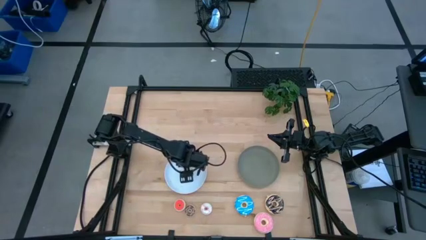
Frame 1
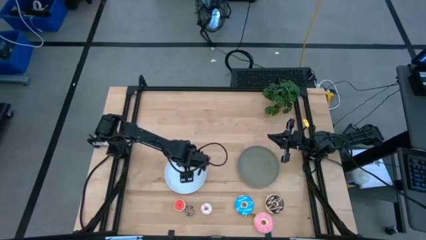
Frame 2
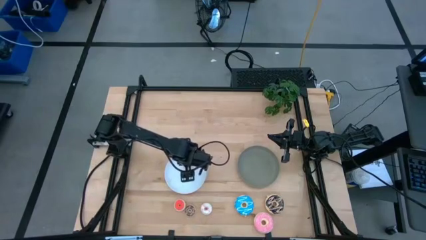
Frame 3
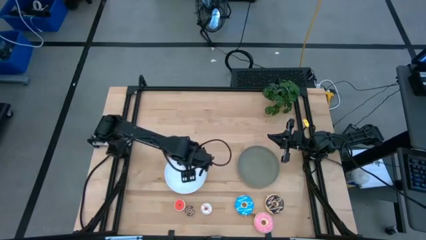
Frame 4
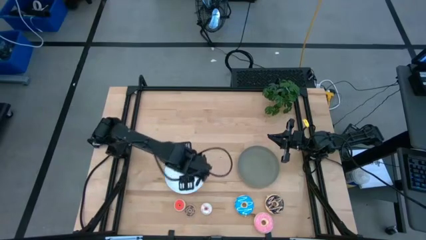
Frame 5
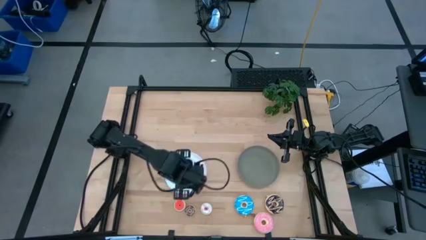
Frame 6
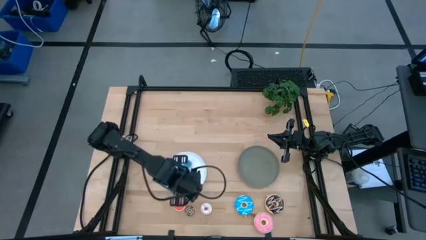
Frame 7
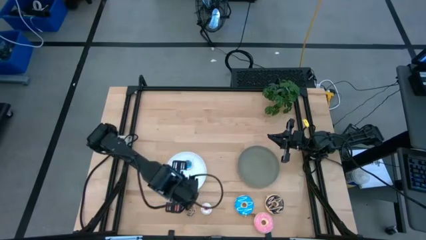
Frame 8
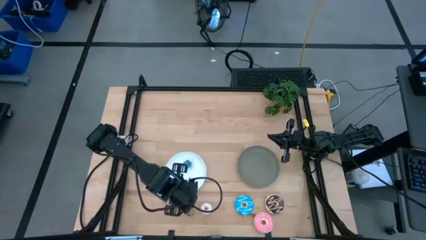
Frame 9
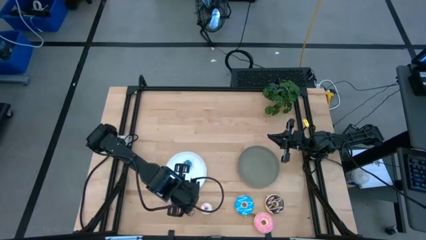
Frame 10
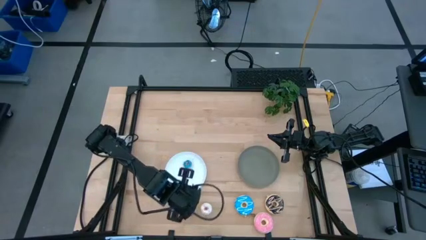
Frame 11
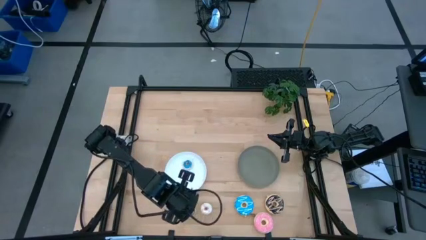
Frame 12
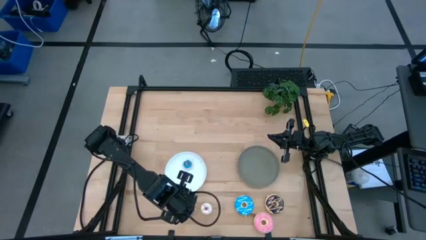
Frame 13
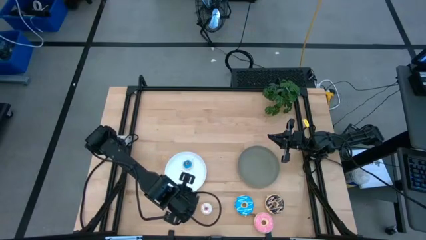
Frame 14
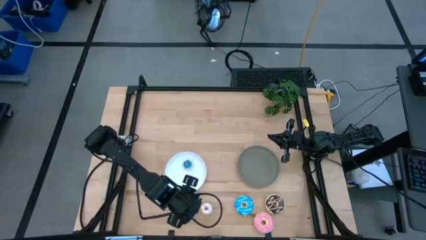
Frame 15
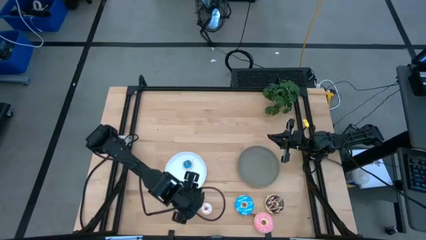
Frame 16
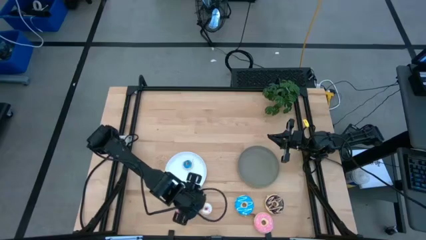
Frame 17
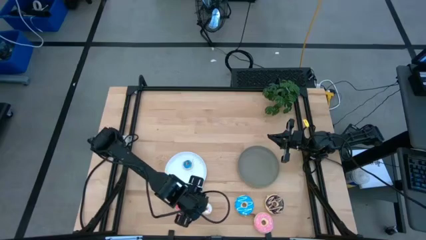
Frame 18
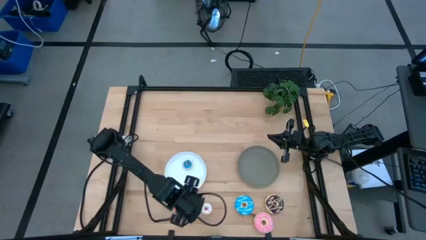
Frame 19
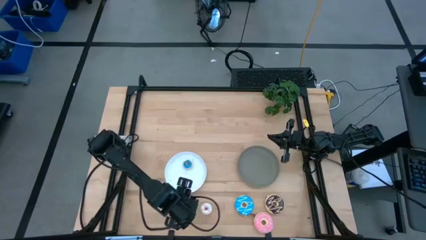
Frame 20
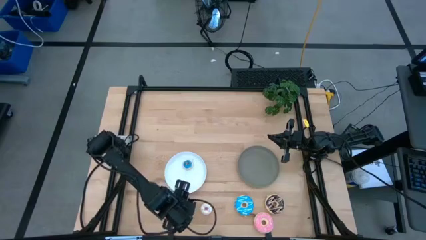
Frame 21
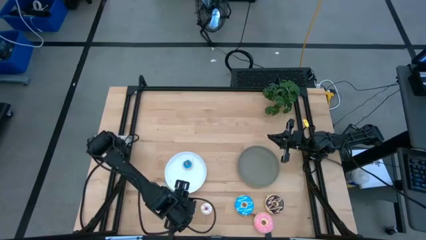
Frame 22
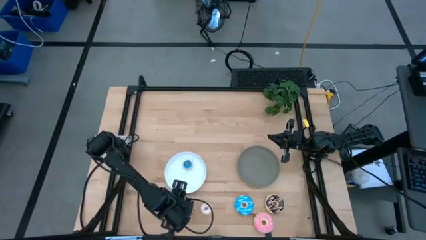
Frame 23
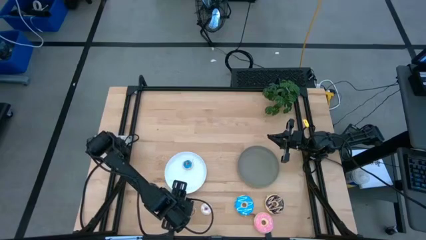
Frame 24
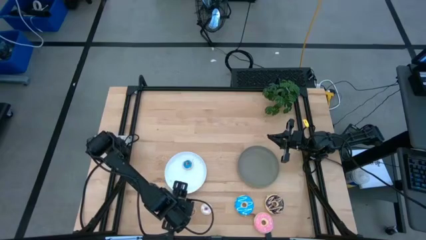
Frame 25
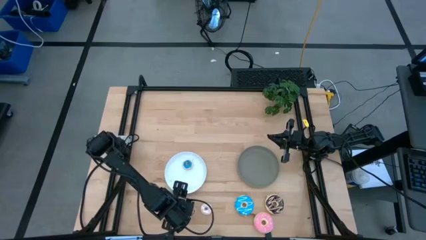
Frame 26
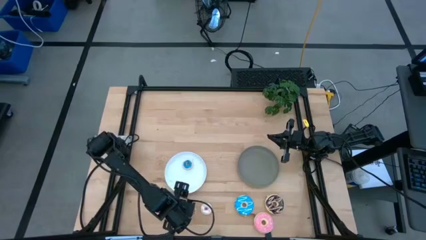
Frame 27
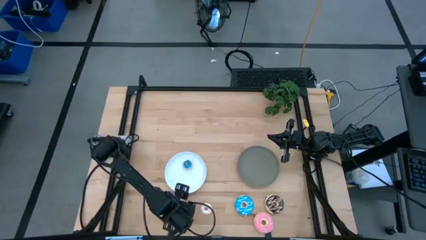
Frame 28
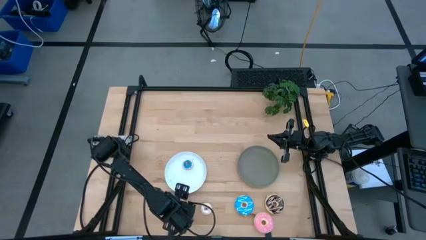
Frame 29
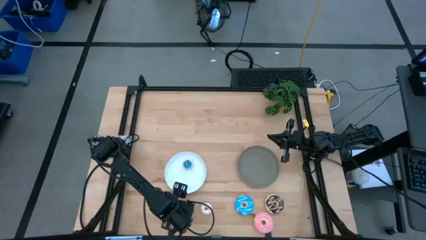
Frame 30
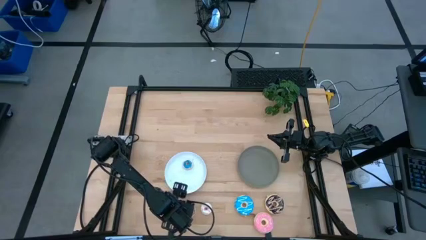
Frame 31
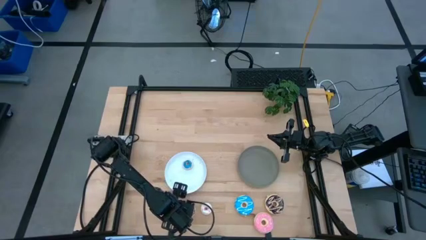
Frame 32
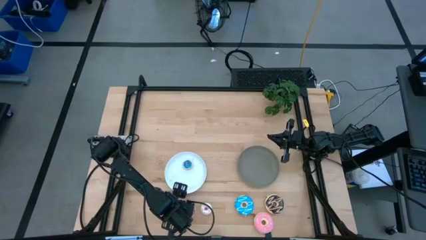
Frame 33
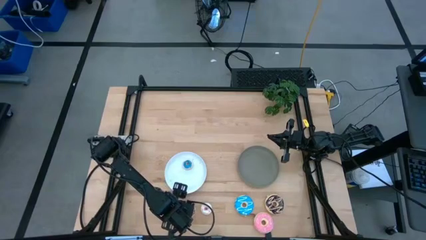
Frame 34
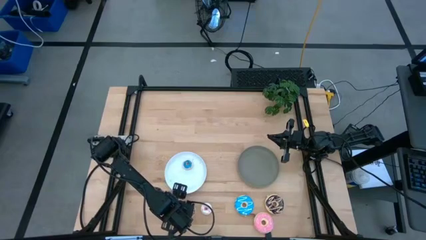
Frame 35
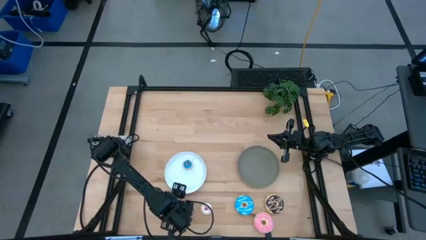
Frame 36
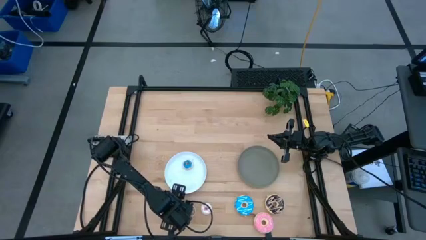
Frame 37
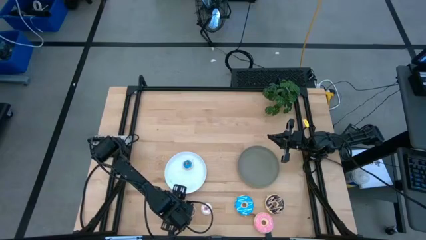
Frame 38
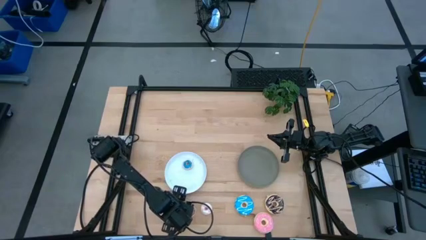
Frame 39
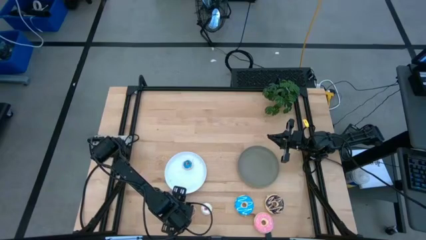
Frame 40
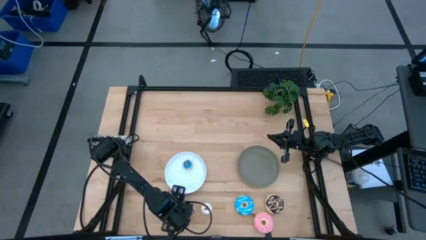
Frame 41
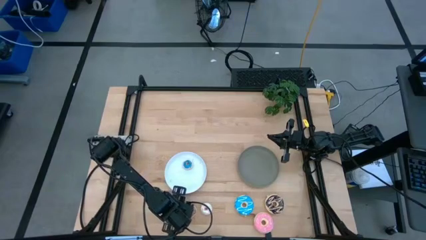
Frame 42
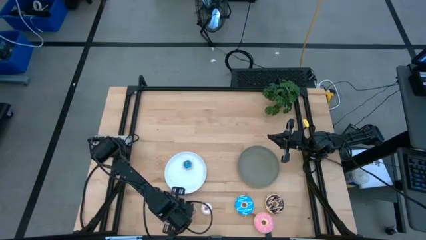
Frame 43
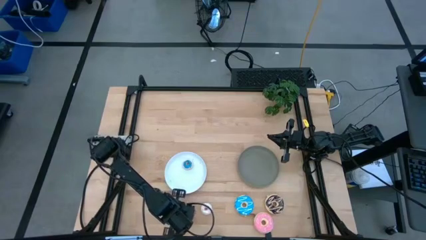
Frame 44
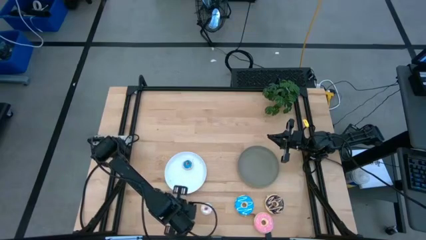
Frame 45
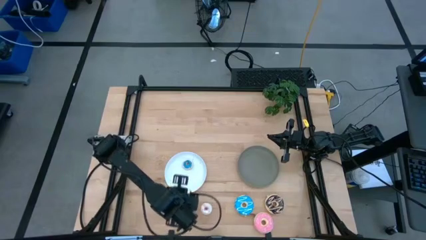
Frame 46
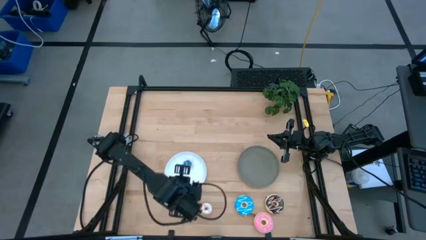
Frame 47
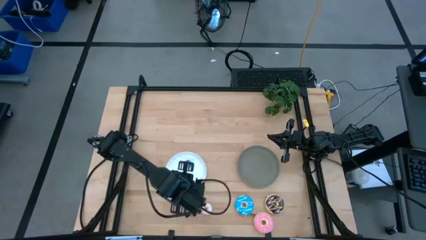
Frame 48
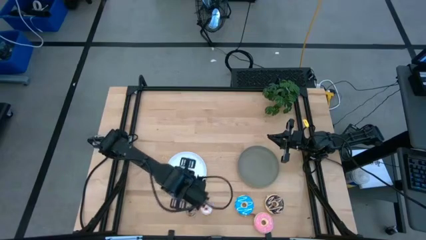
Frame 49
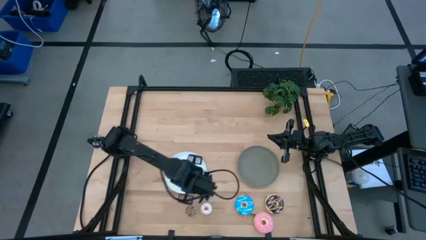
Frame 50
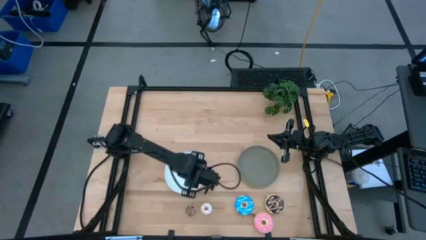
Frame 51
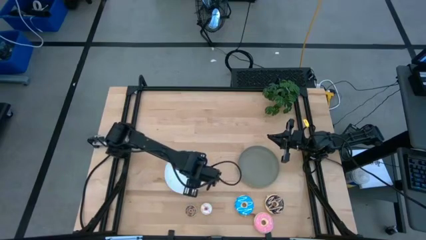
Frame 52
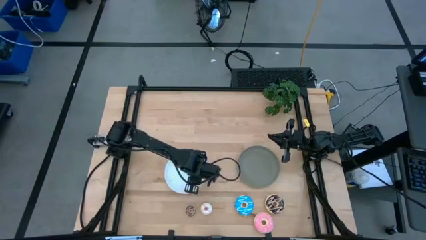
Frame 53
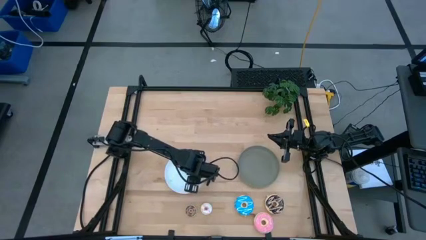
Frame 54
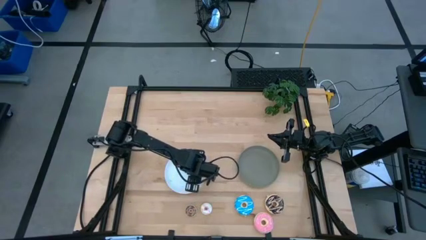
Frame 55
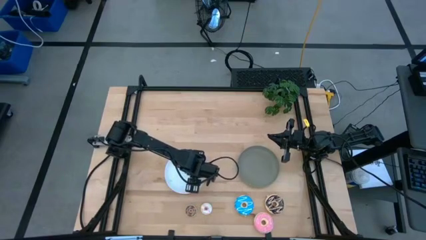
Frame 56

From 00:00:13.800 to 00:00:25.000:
Task: Pick & Place donuts
Put the small orange donut on the white plate

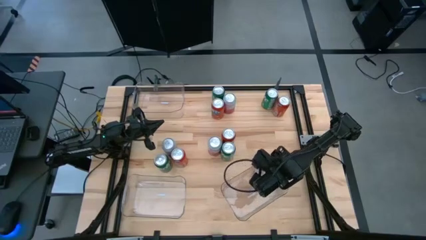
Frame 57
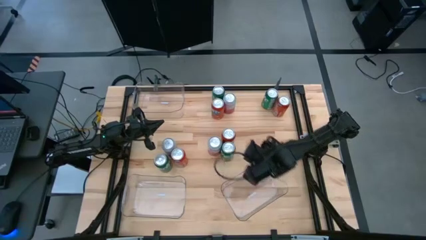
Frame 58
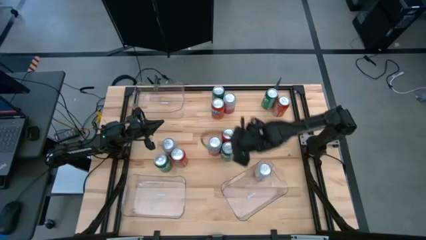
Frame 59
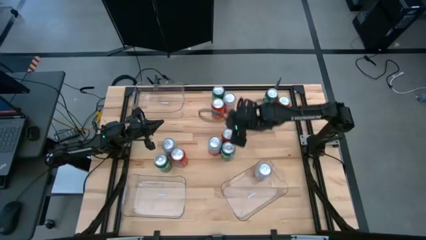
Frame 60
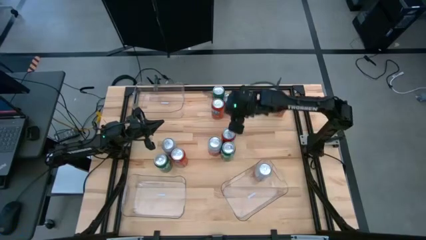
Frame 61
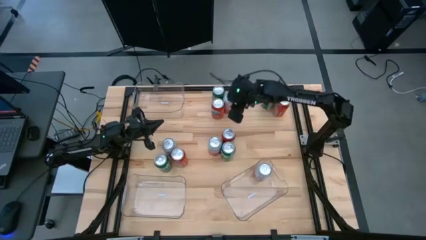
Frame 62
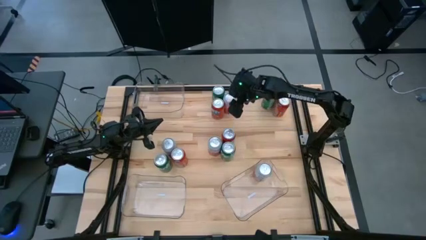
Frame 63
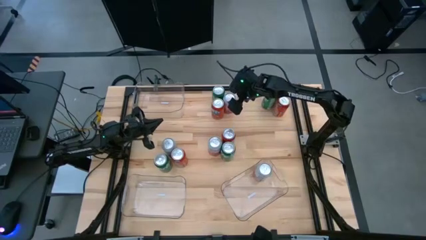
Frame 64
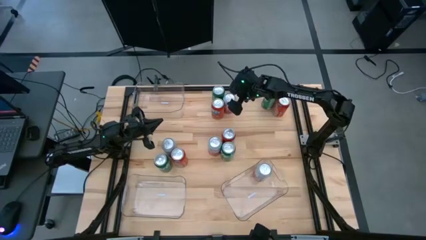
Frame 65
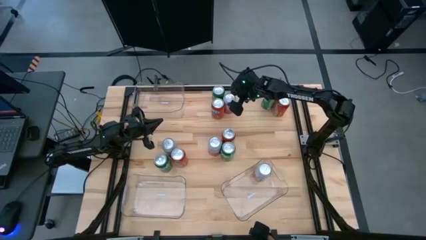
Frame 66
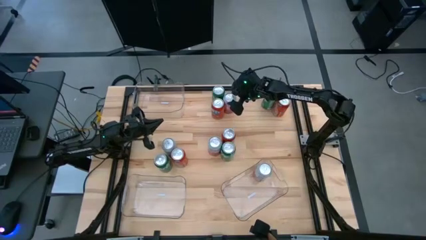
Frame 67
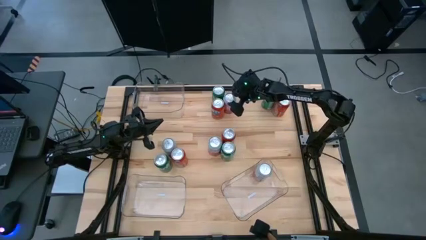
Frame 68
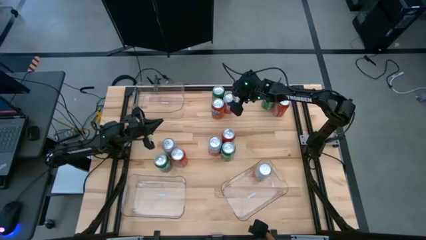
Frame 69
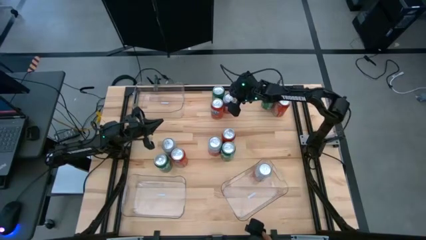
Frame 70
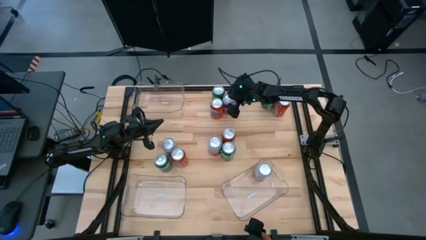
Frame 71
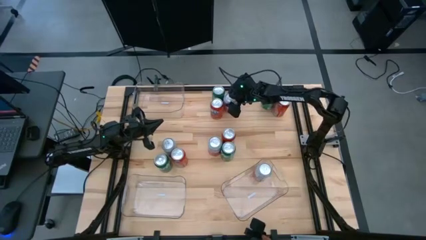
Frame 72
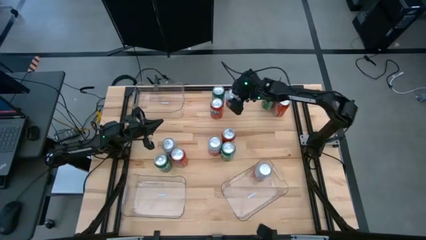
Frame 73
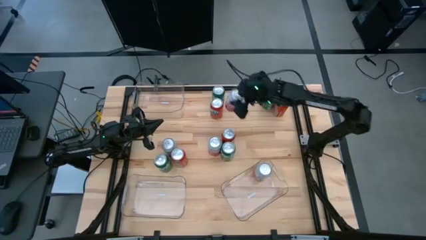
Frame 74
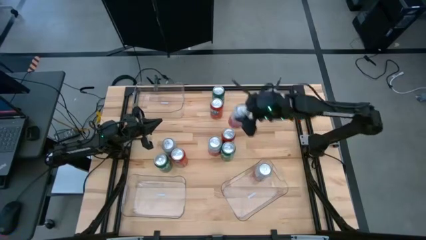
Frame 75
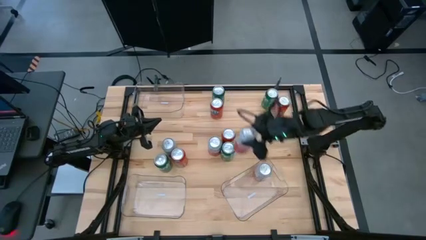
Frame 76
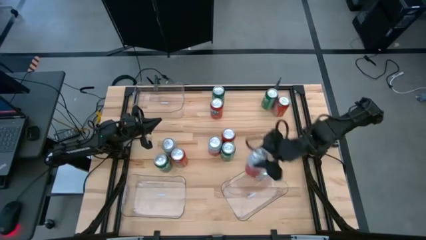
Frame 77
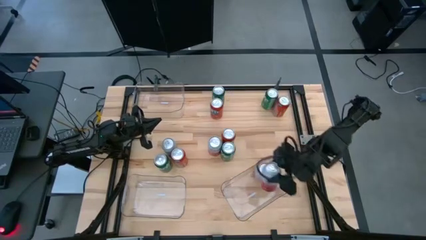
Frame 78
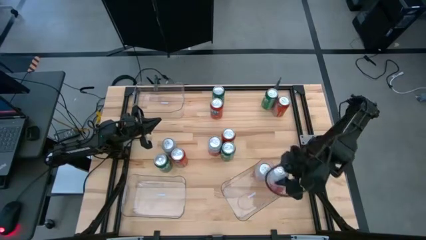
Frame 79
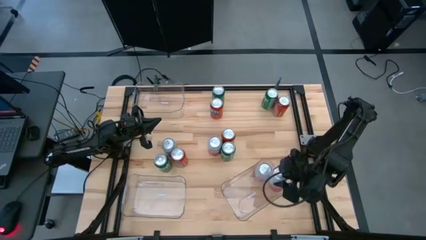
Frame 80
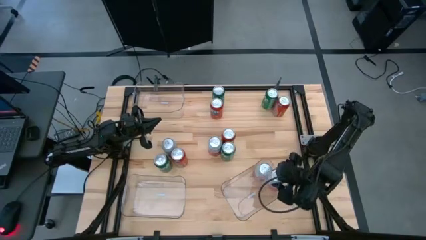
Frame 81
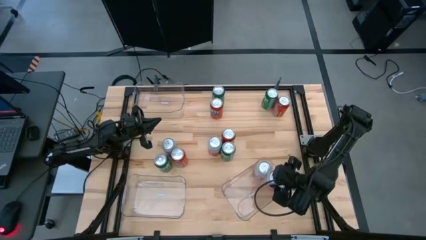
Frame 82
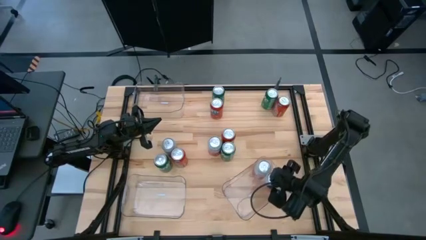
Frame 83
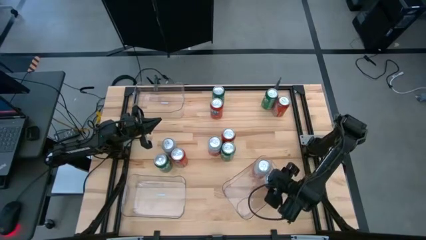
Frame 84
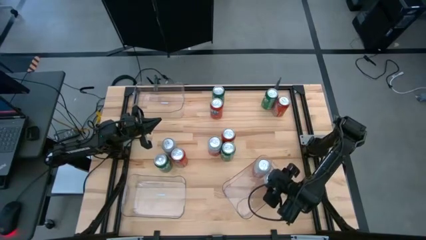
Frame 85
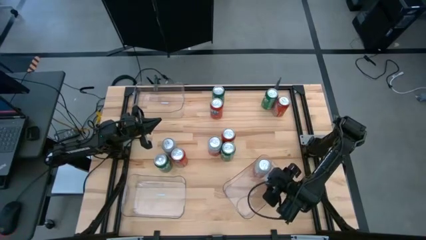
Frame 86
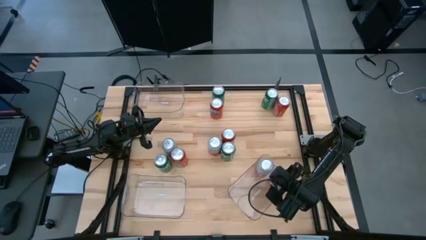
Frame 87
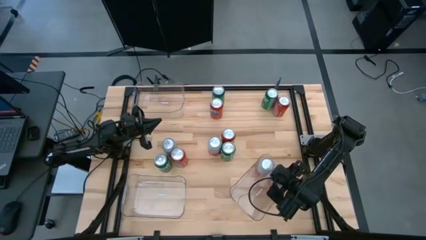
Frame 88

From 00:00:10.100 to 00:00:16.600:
Task: Sort soda cans
Put the pink/white soda can into the bottom right transparent bin
